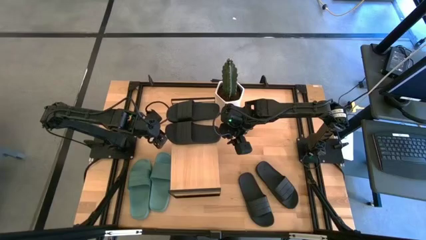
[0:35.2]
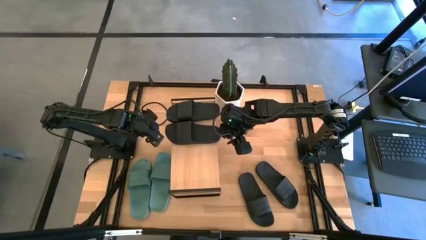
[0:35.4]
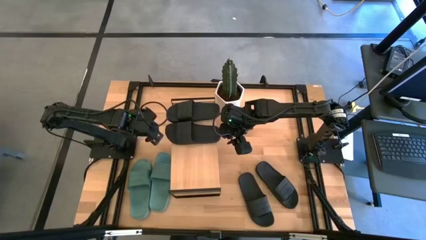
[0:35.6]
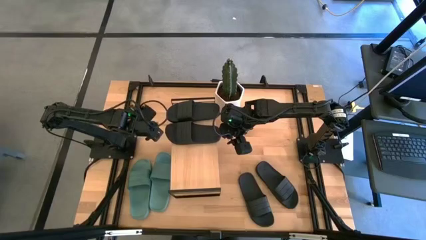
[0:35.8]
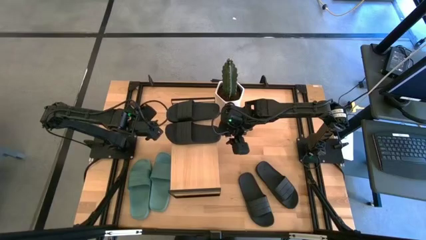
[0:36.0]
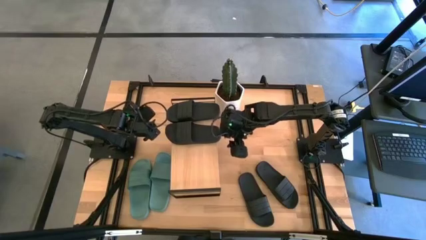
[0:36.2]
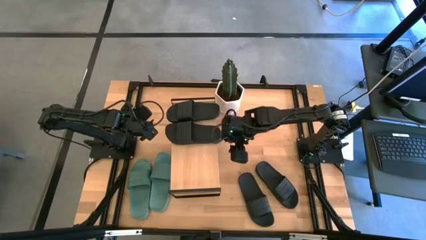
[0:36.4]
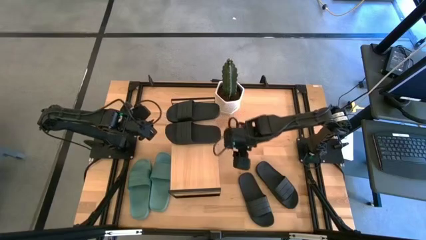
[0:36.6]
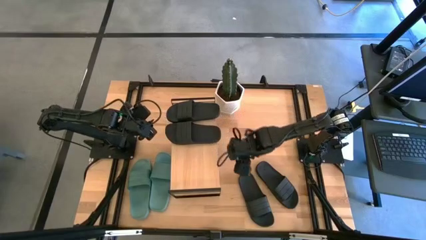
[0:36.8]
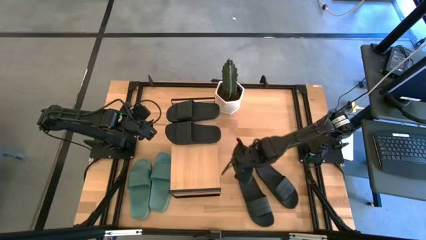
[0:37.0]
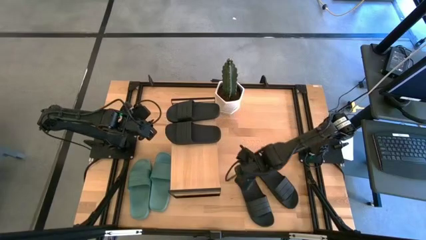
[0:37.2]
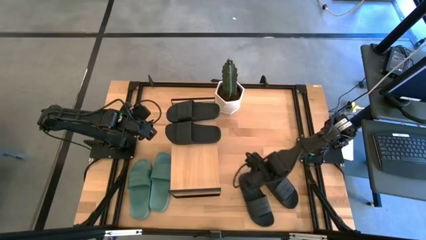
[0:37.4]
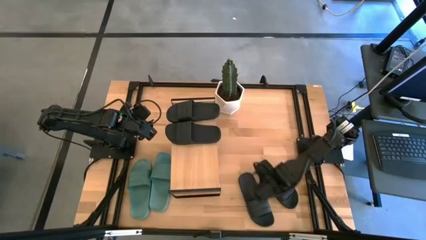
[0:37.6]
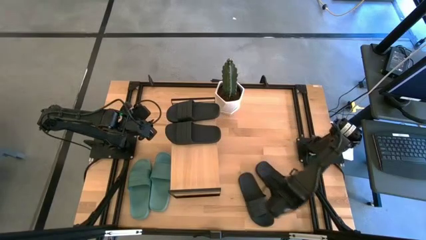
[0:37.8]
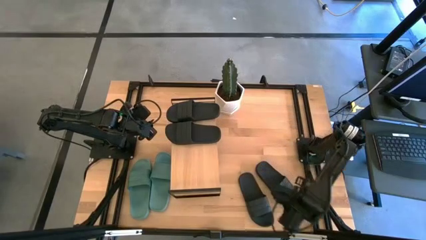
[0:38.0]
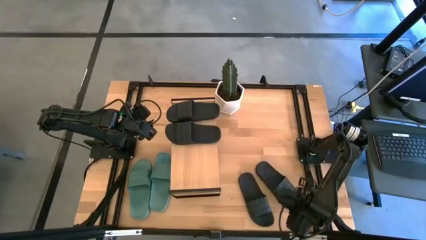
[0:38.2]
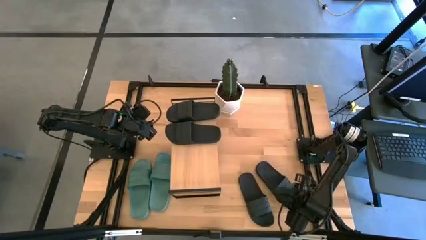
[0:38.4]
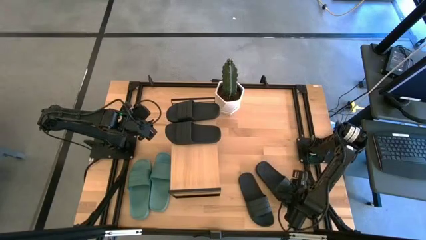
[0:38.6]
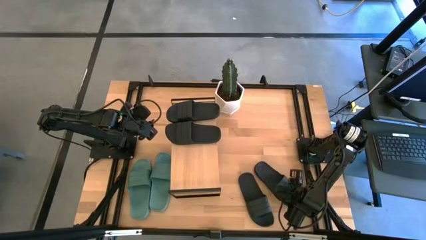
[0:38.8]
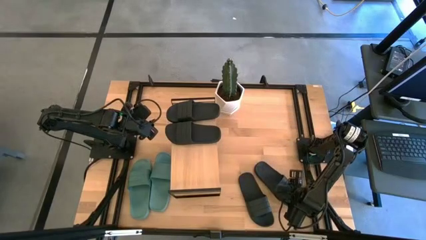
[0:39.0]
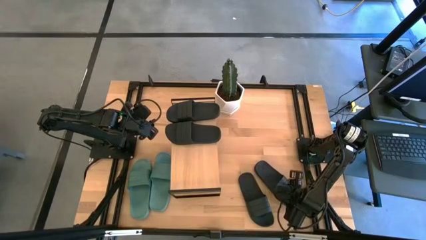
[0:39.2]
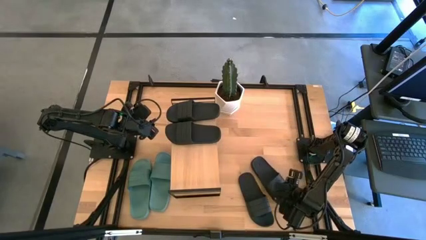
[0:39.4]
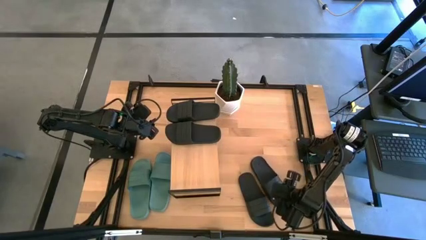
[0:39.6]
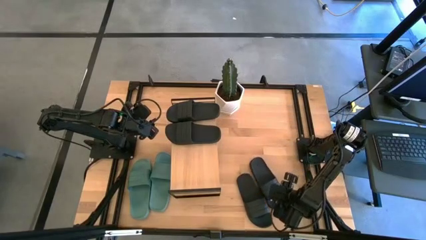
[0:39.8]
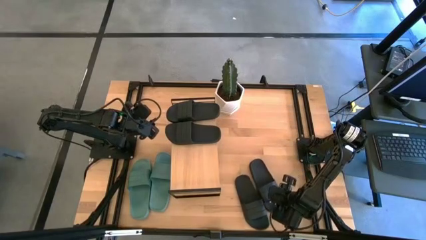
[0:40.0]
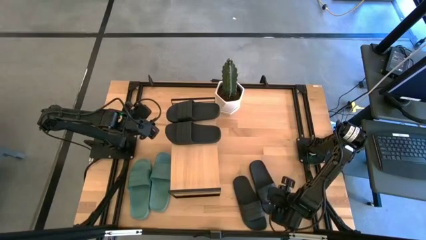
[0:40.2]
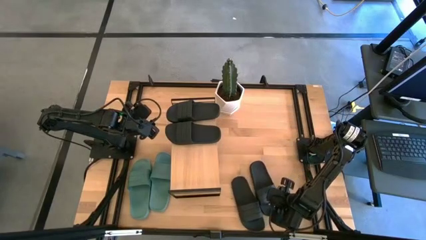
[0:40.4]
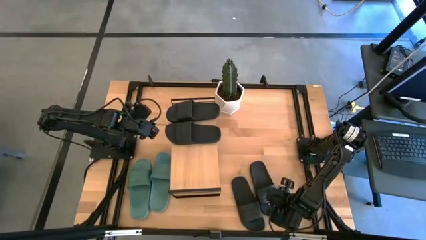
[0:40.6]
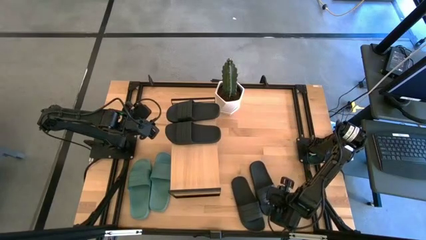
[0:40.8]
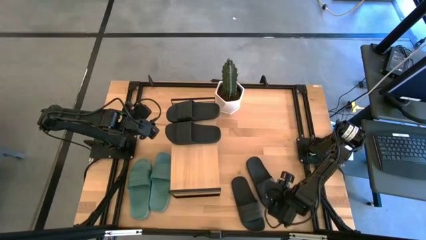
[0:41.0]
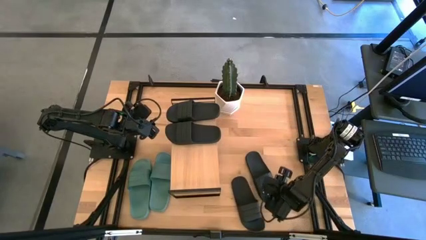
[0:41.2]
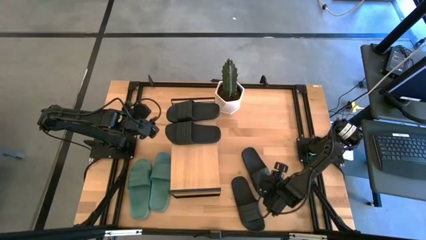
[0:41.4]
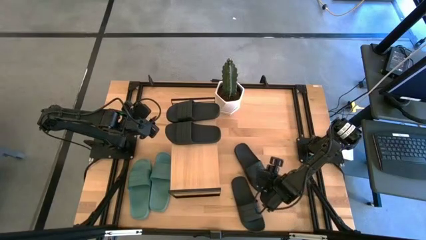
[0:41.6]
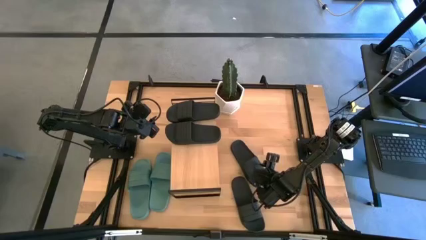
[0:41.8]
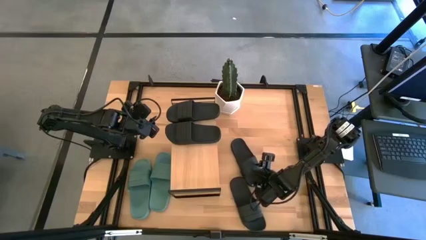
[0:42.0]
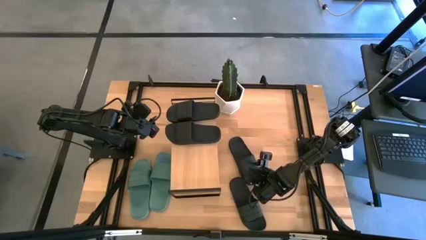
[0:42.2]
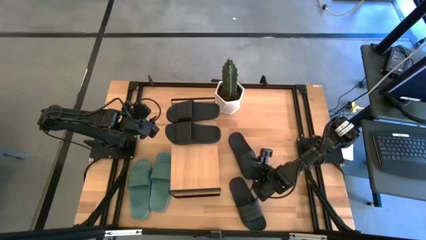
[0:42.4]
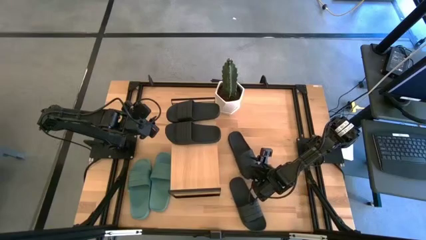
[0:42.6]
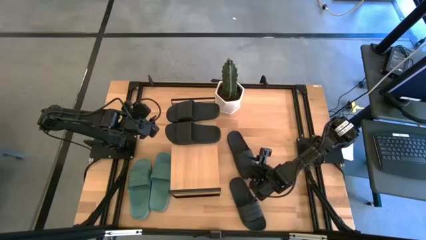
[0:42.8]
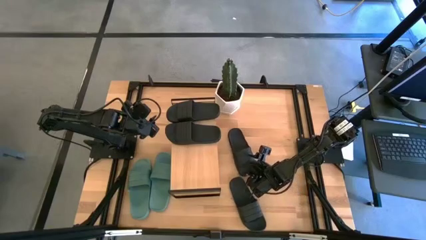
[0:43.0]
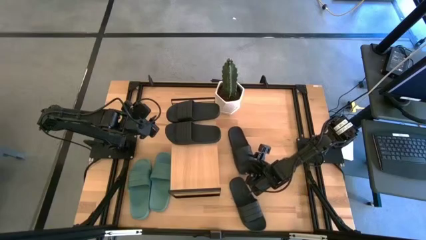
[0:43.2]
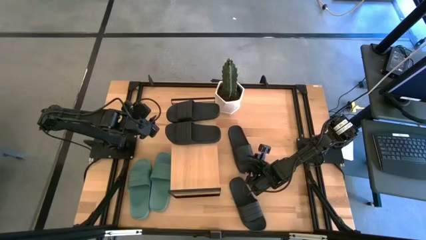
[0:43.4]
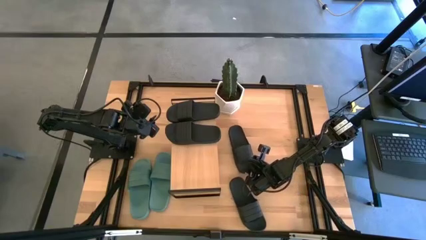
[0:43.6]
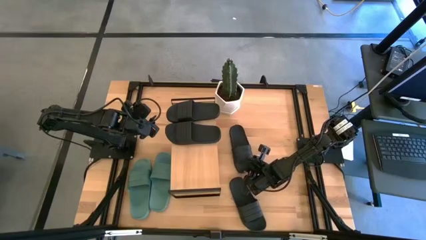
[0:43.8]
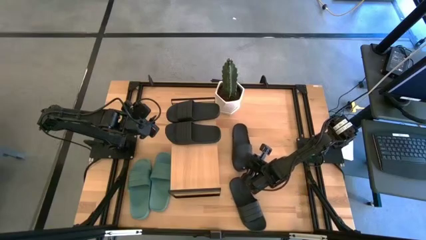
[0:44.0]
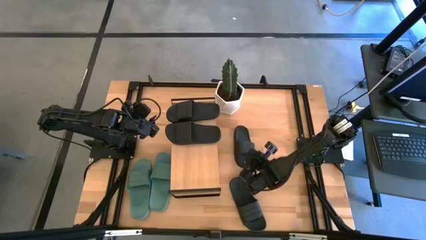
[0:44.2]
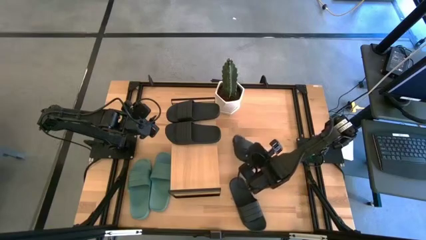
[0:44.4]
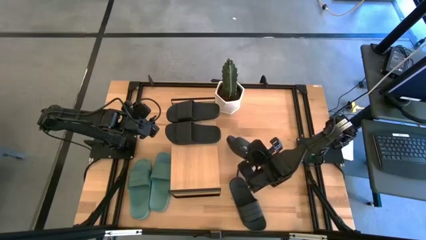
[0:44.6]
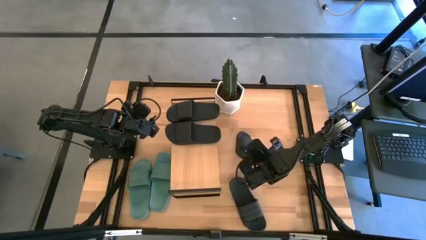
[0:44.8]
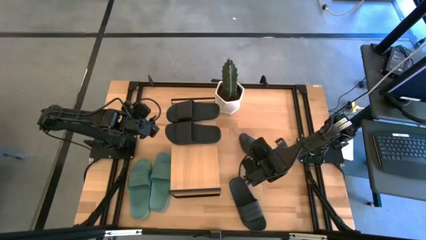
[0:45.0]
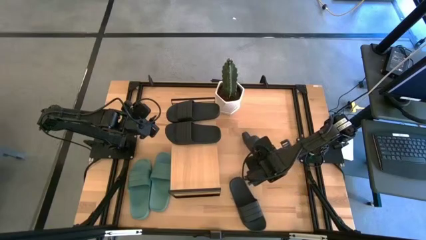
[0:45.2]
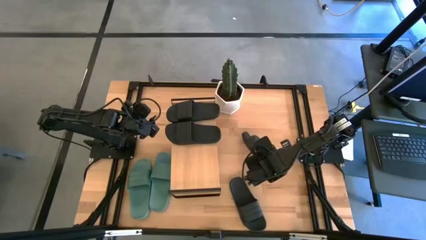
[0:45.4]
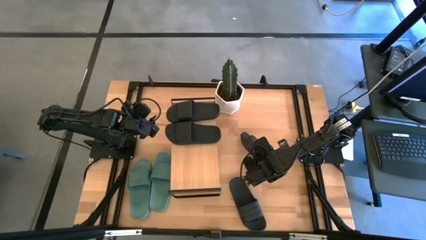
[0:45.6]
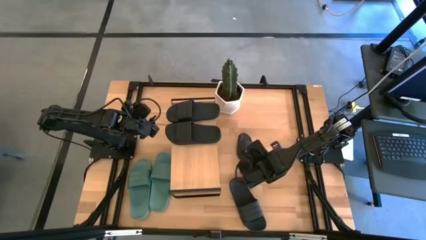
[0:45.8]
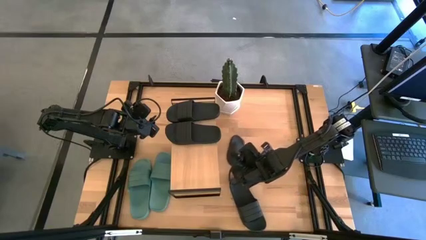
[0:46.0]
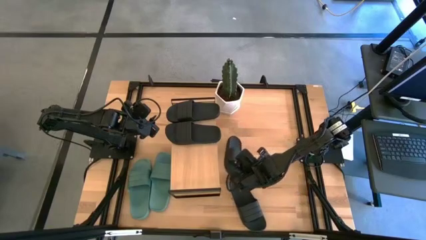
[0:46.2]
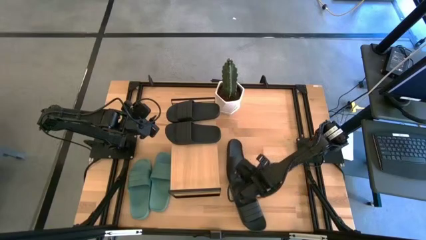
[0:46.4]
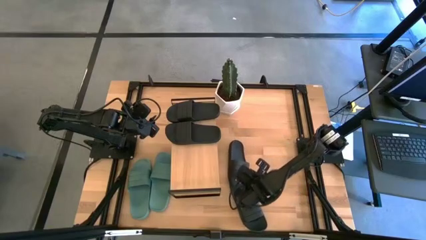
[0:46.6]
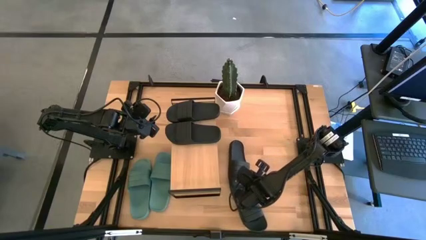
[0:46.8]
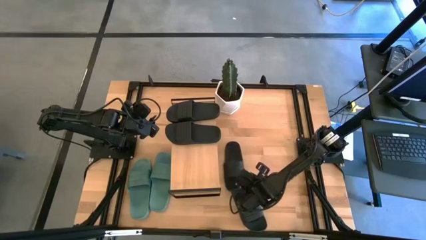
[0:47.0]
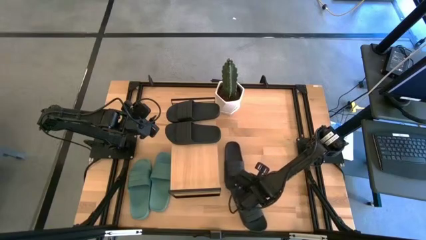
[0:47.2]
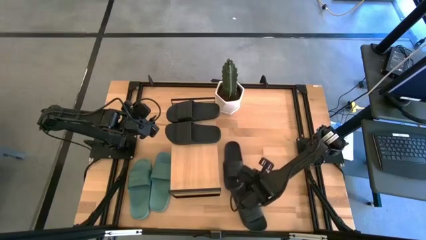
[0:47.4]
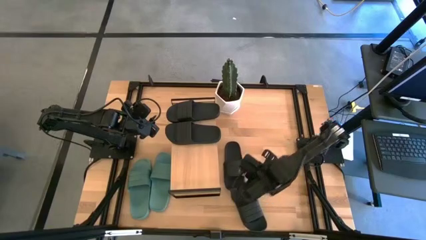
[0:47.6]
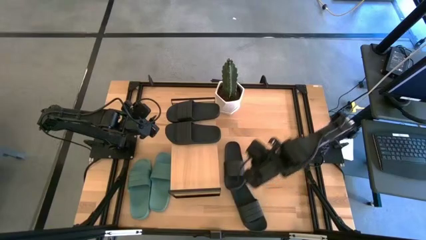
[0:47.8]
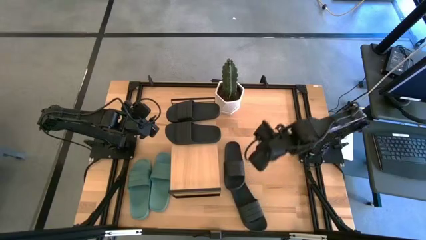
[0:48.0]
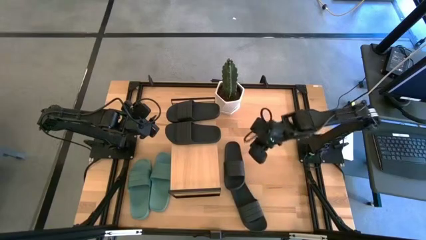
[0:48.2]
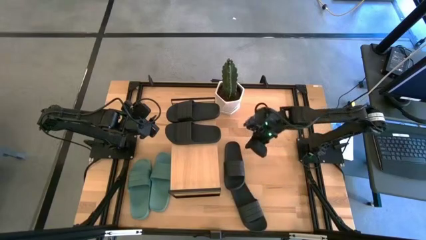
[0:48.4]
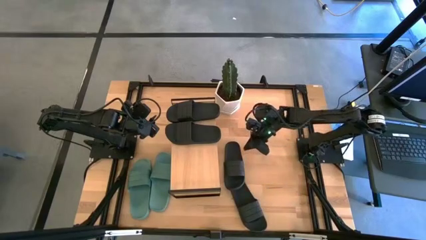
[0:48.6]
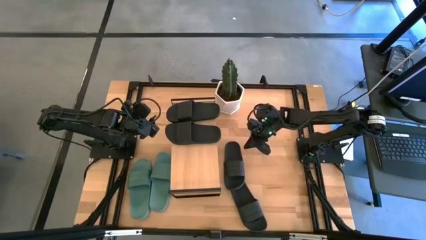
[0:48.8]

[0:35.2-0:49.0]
Task: Pick and place slides into the shelf
Put the black slides under the shelf
